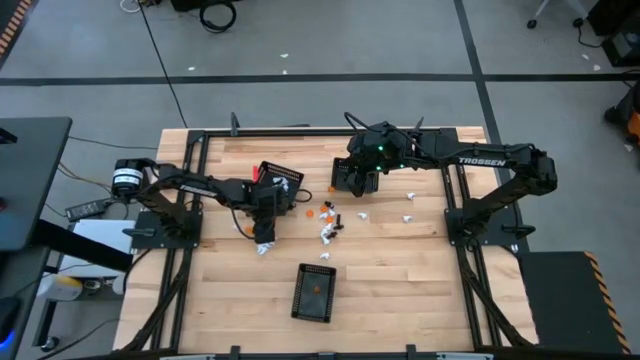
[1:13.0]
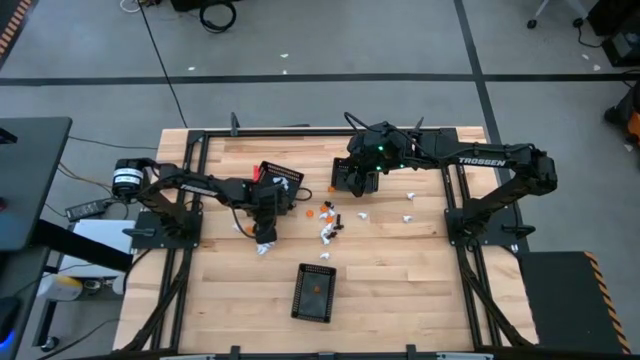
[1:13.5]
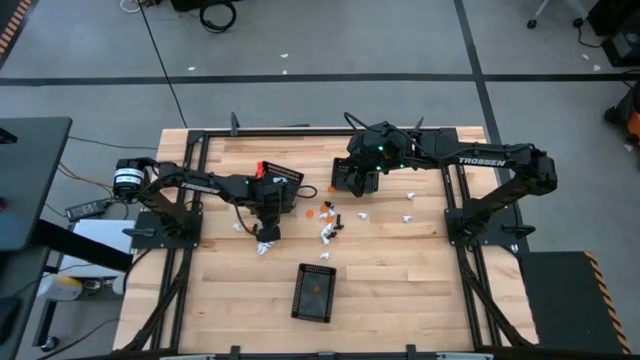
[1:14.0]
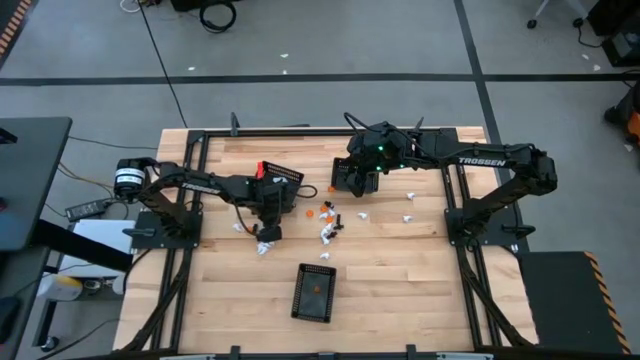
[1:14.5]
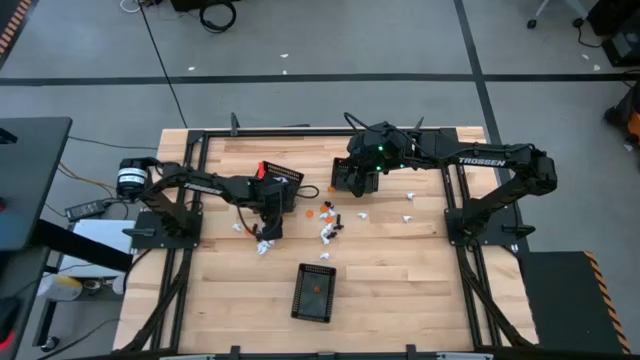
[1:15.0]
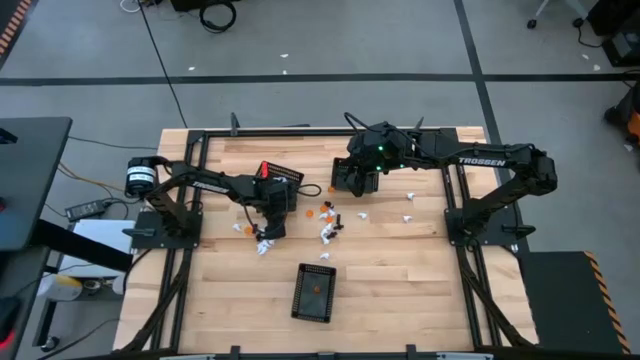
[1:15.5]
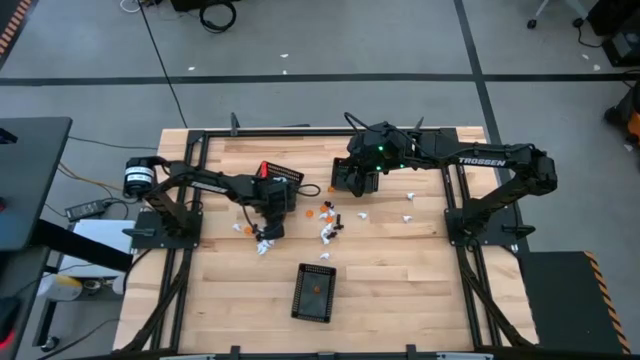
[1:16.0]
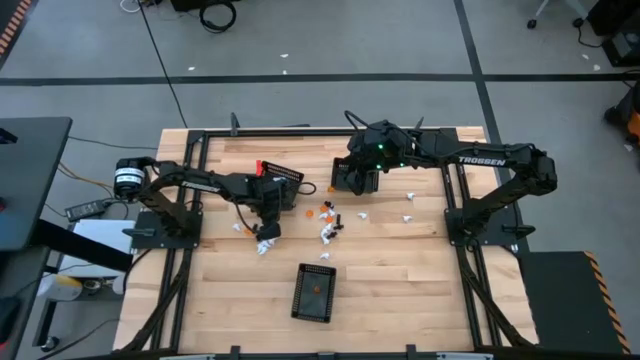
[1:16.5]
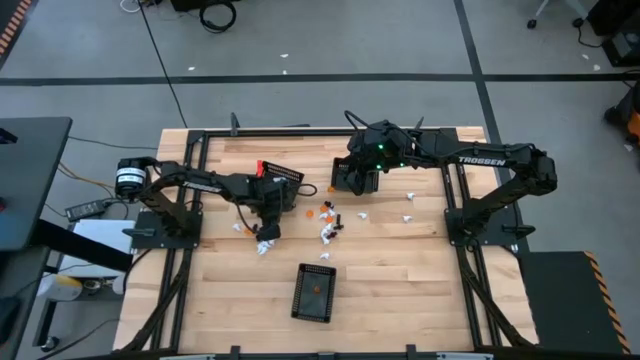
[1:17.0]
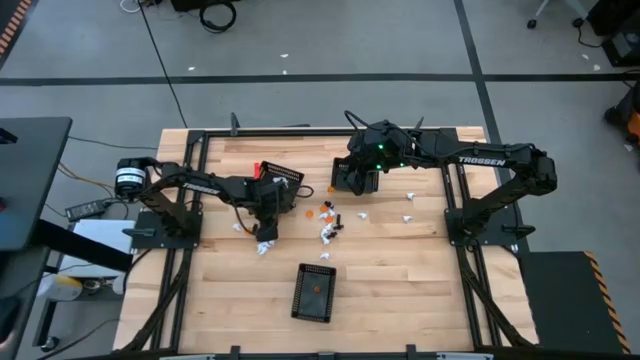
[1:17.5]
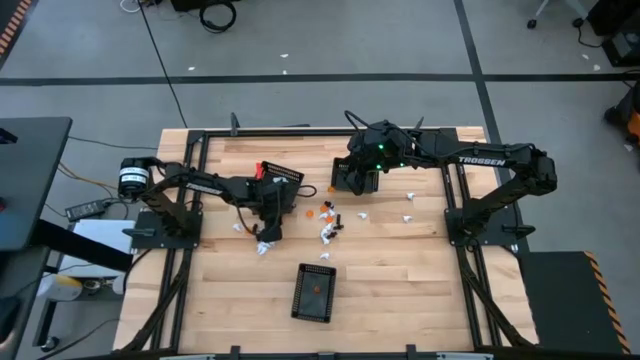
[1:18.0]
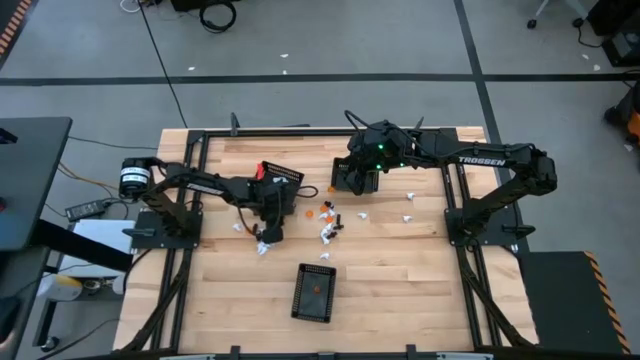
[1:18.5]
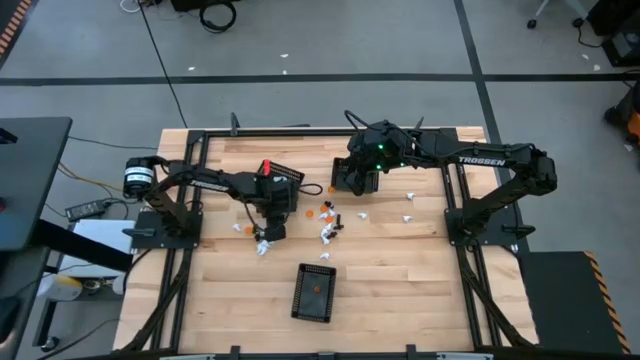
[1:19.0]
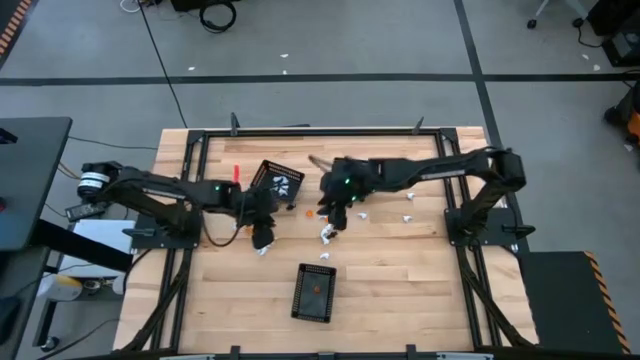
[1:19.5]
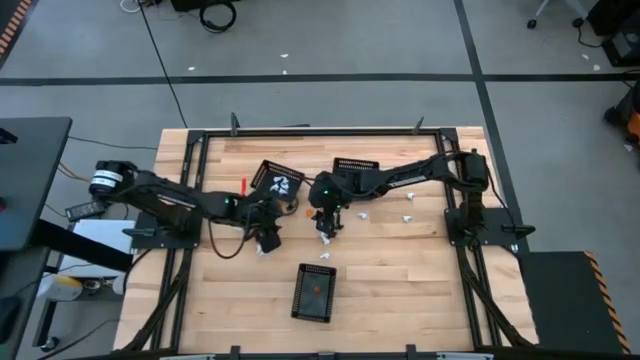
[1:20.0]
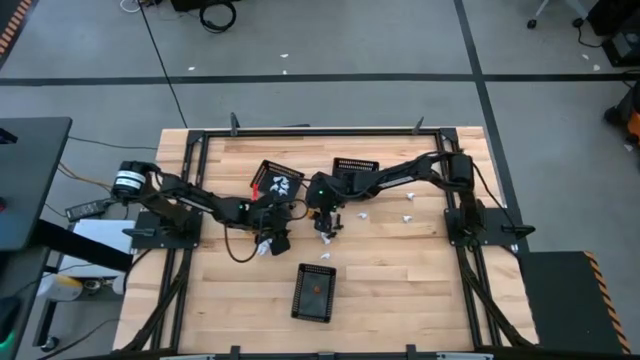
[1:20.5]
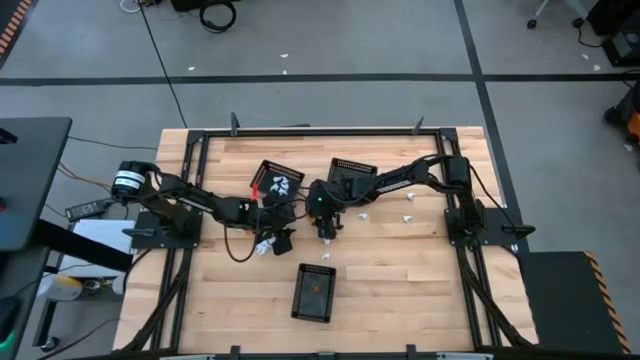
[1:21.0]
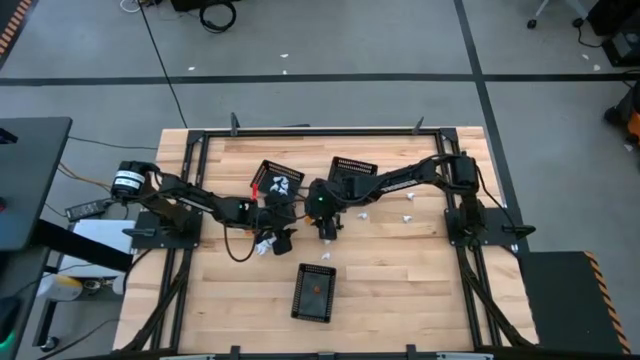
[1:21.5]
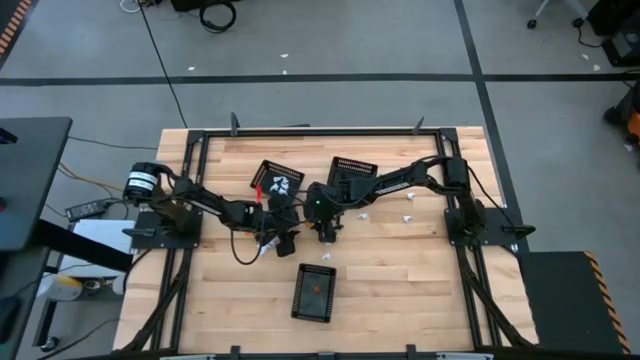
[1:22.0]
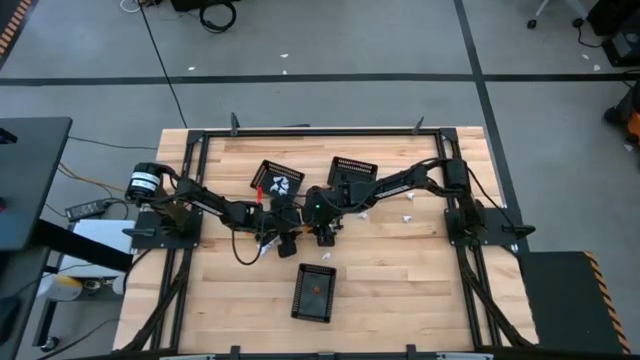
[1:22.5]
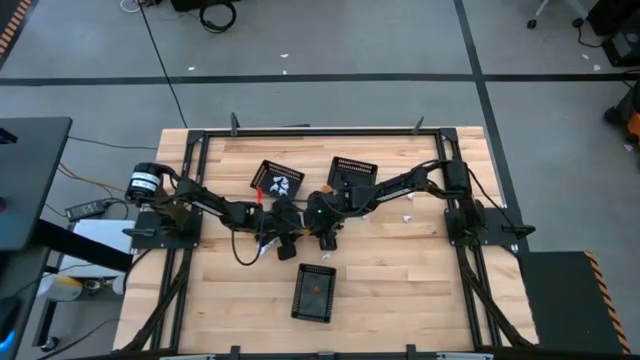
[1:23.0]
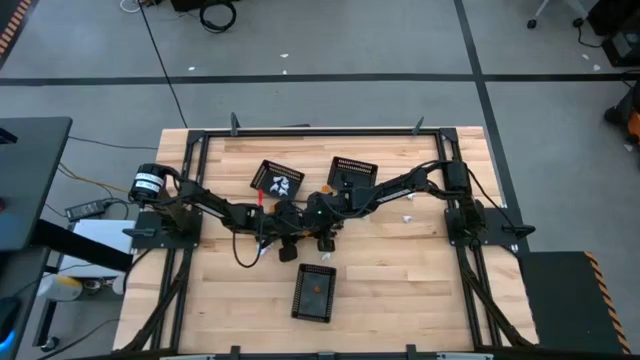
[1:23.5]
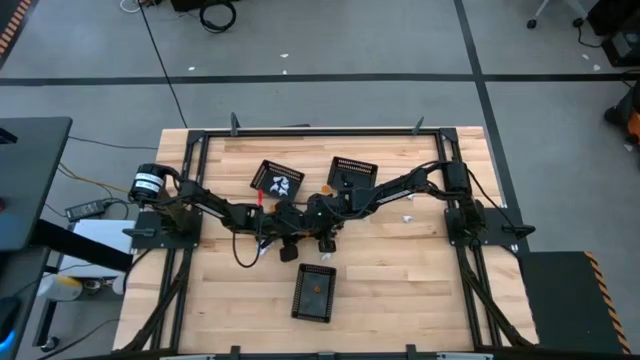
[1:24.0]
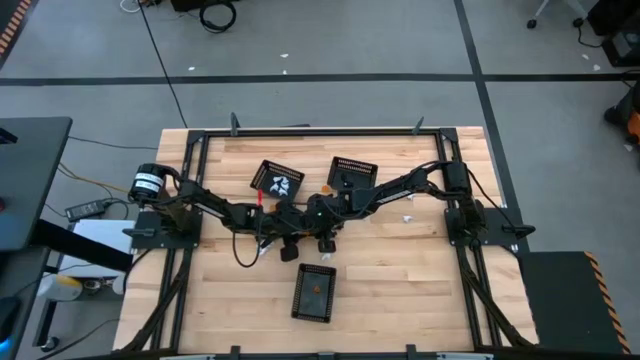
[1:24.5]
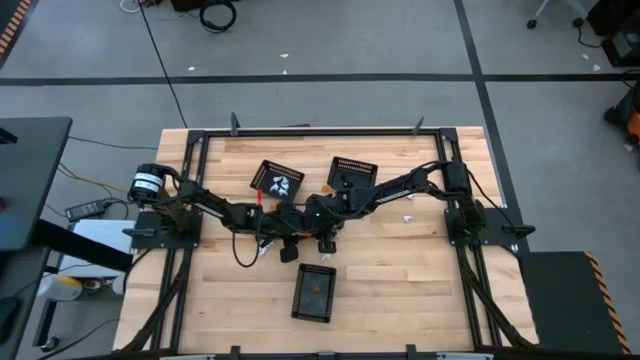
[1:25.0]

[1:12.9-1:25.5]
Task: Sort Halloween decoration
Put the orange pumpkin toy into the bottom black basket

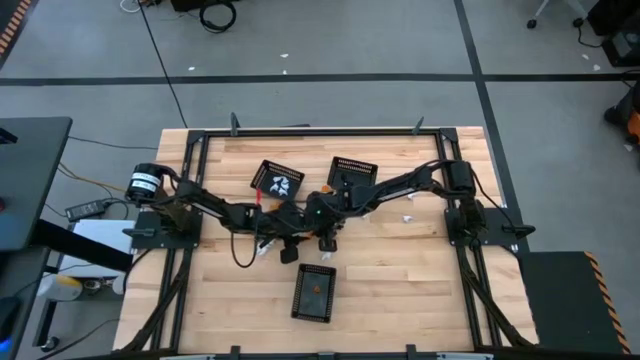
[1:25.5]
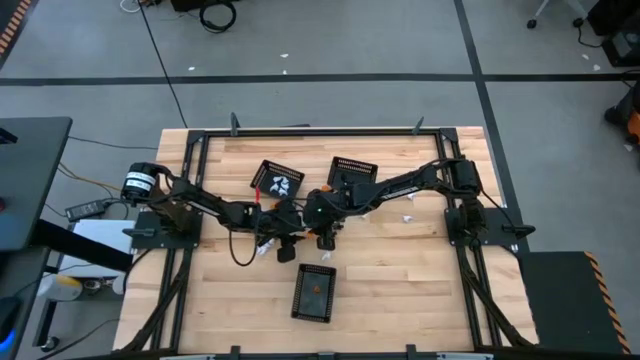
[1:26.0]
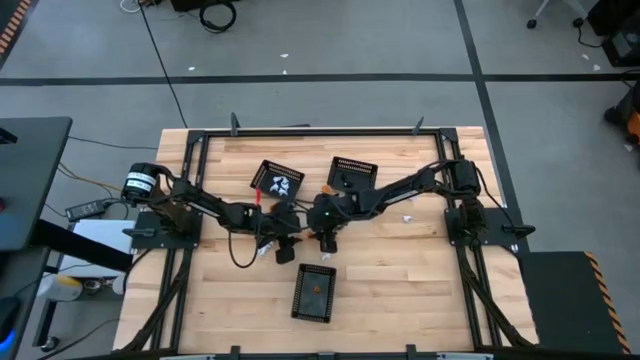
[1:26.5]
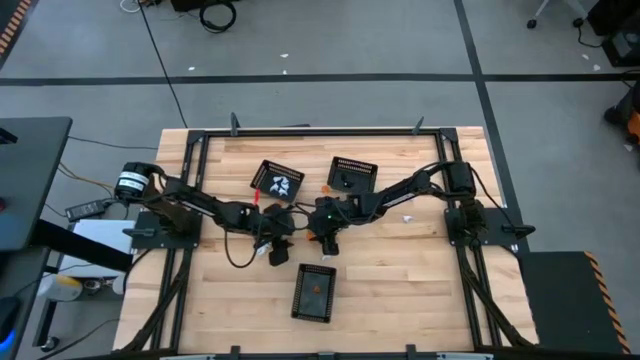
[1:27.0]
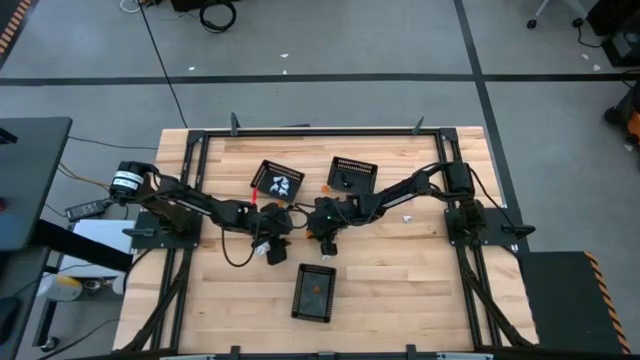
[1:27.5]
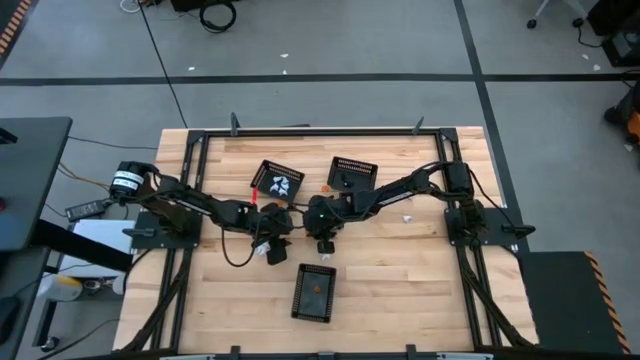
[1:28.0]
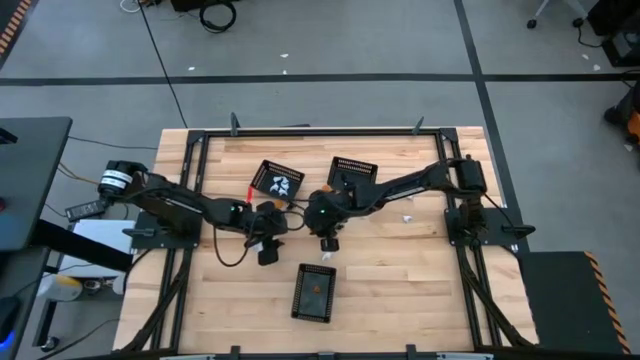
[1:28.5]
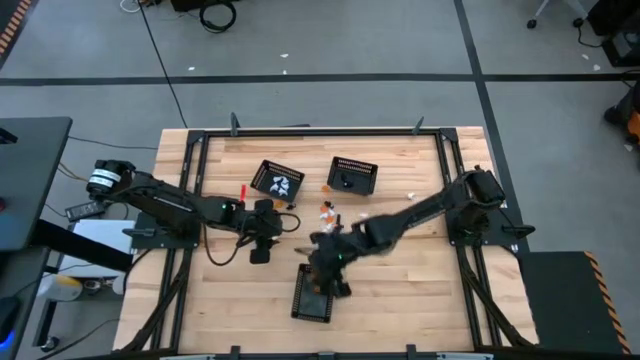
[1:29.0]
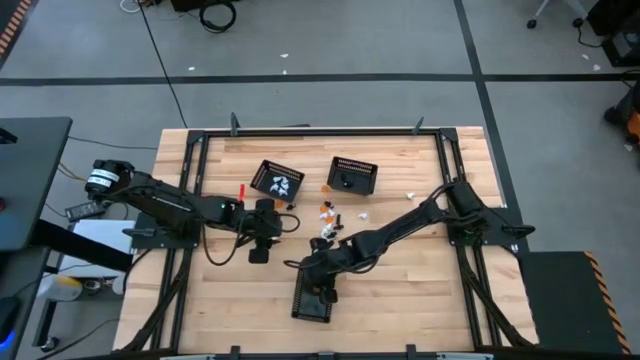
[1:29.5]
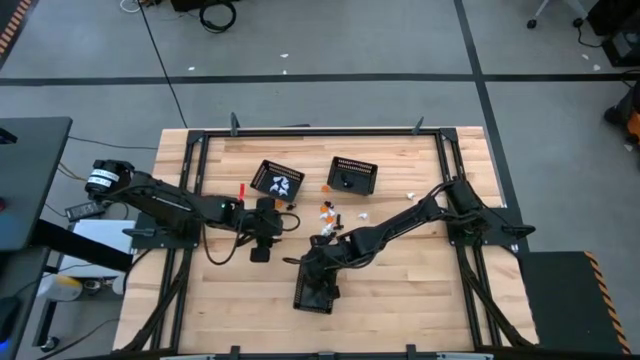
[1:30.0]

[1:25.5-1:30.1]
Put the orange pumpkin toy into the bottom black basket

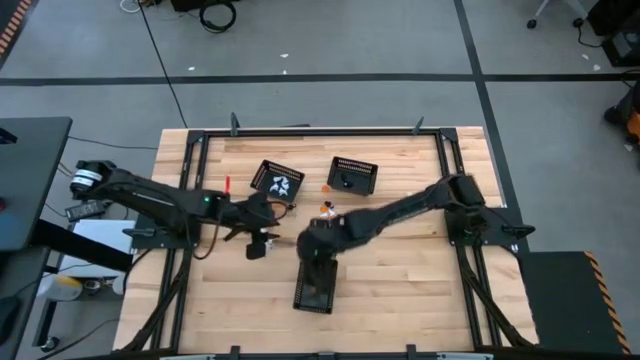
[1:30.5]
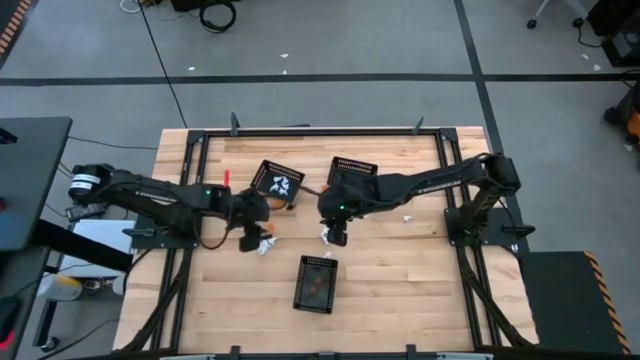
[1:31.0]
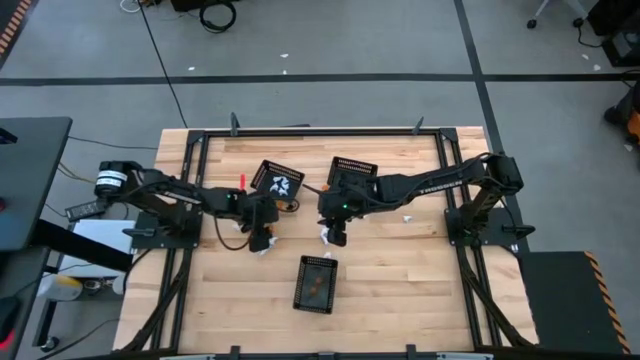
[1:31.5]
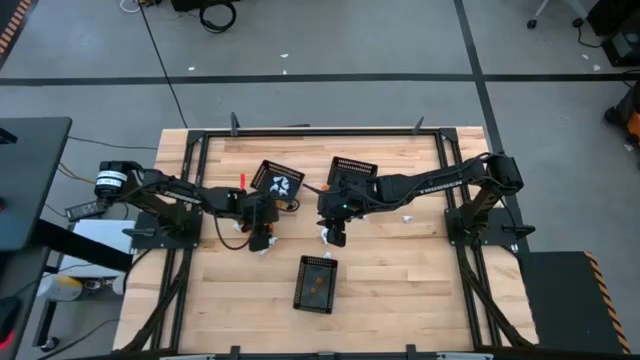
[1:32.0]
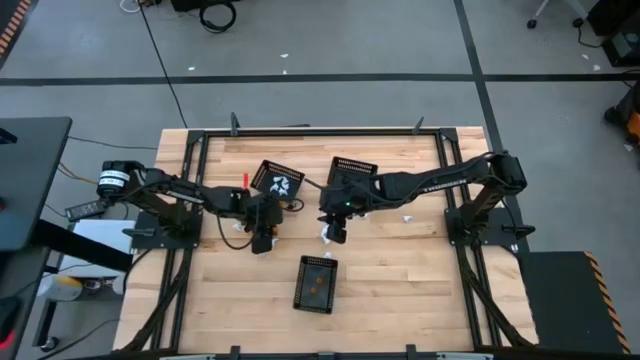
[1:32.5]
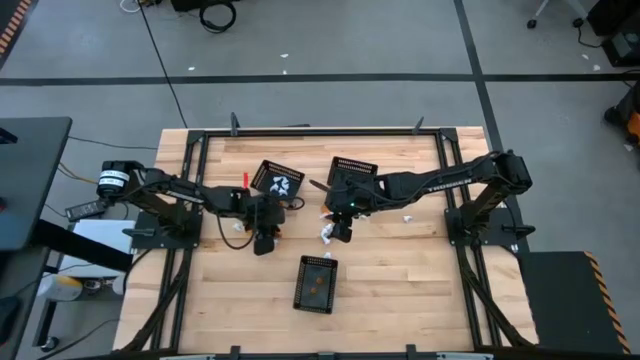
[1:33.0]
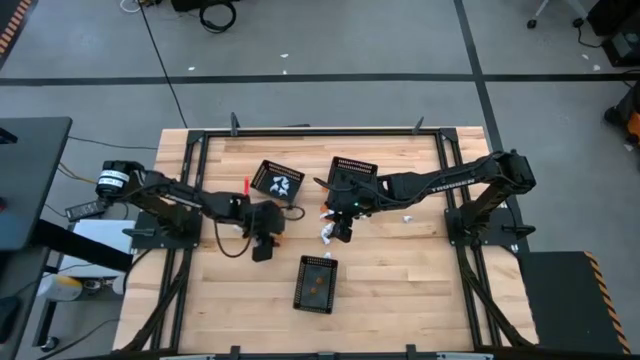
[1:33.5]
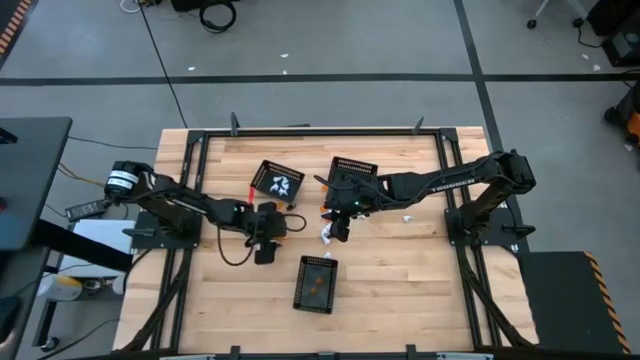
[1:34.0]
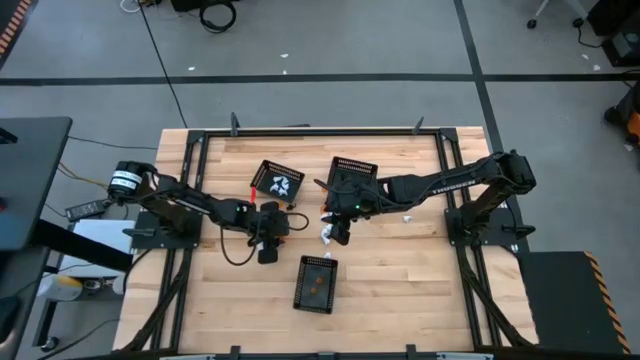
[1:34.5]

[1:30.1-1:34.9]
Put the orange pumpkin toy into the bottom black basket

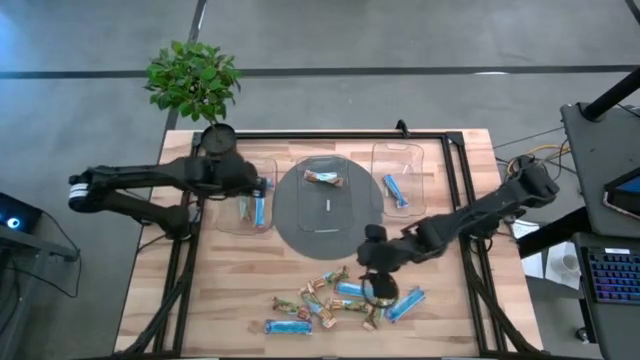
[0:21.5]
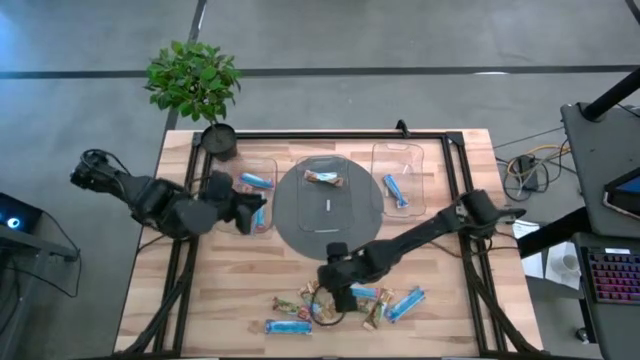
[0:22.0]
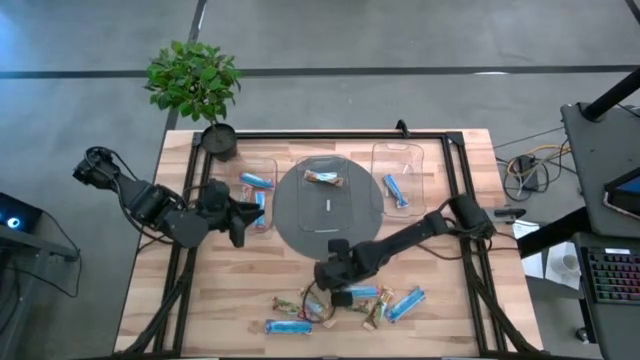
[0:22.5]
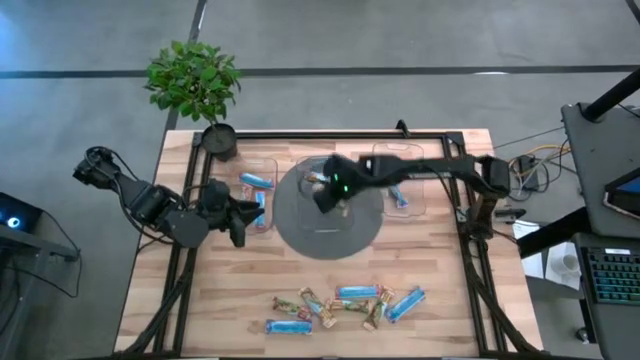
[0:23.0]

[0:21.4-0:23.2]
Task: Pick and place Granola Bars by type
Put the yellow granola bar into the middle transparent bin
